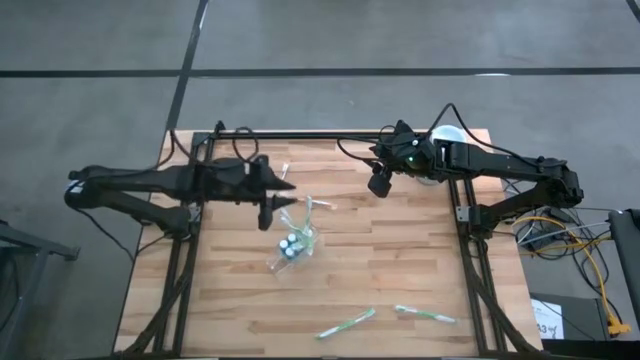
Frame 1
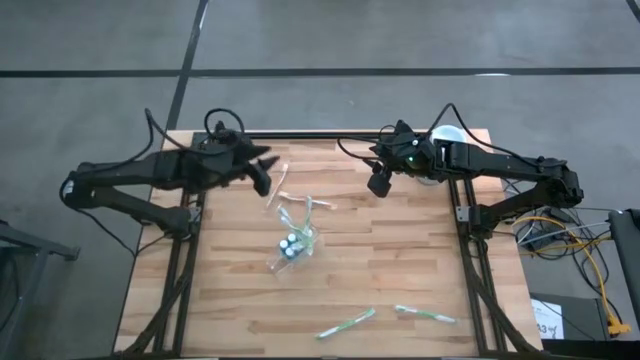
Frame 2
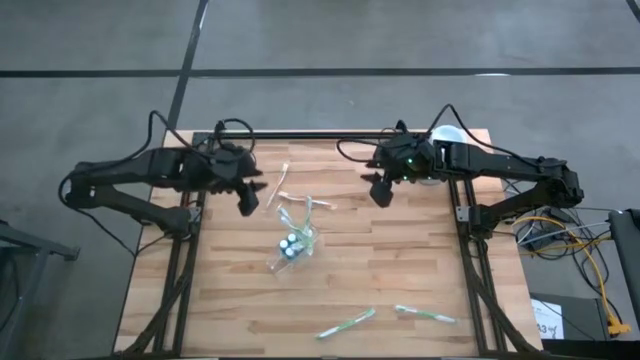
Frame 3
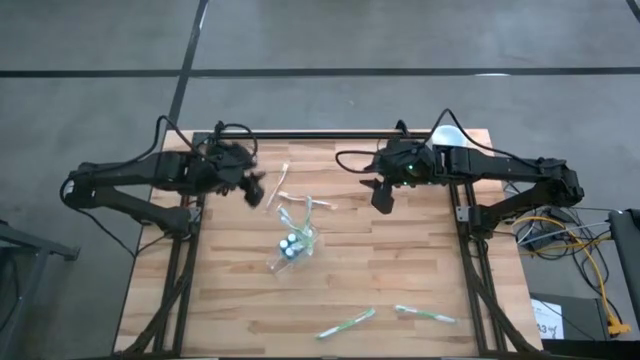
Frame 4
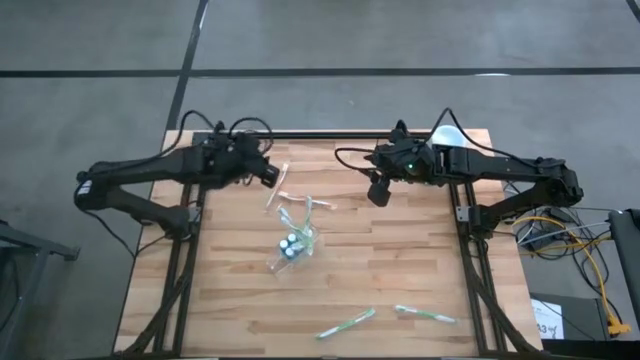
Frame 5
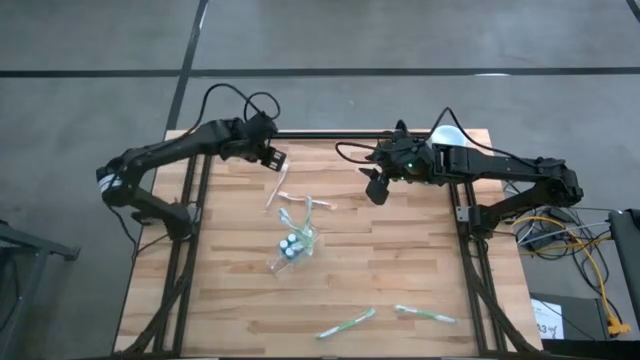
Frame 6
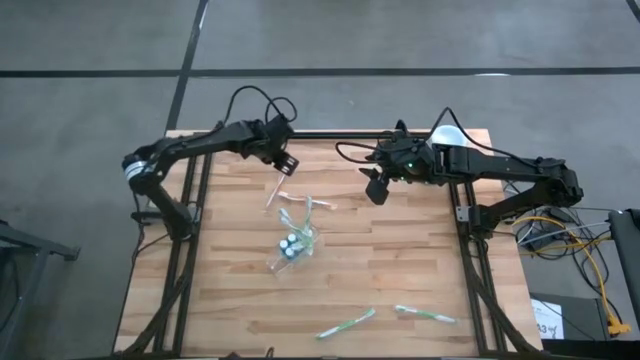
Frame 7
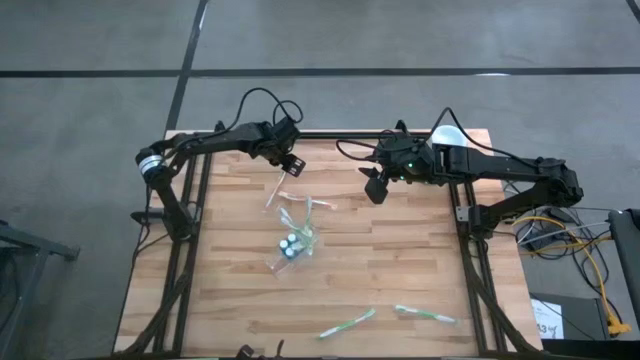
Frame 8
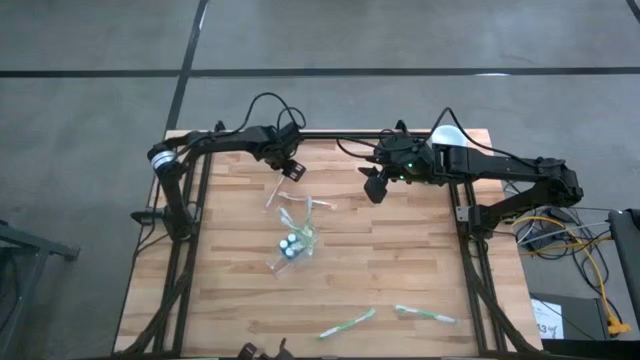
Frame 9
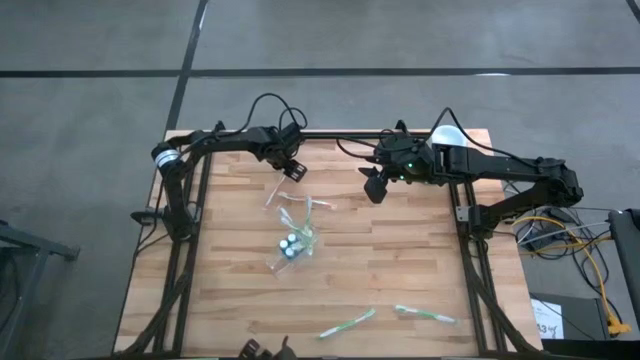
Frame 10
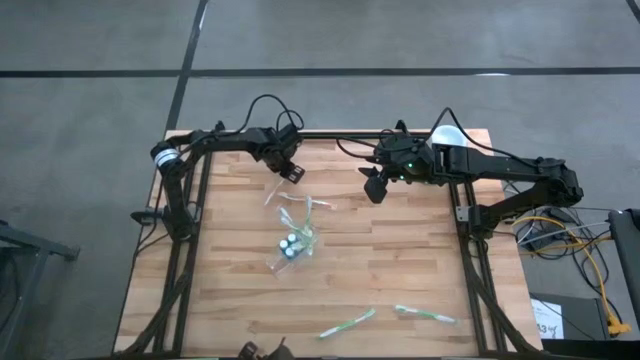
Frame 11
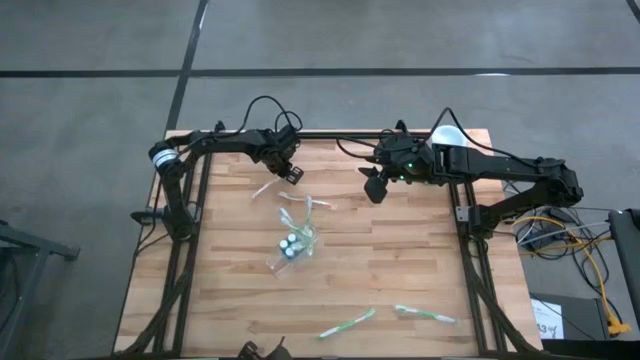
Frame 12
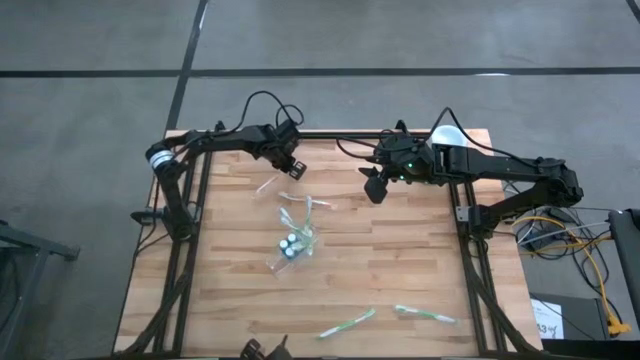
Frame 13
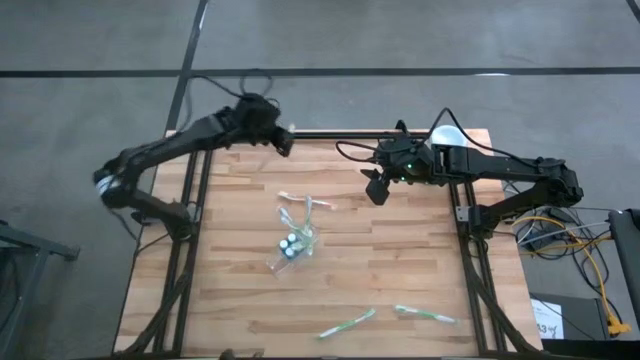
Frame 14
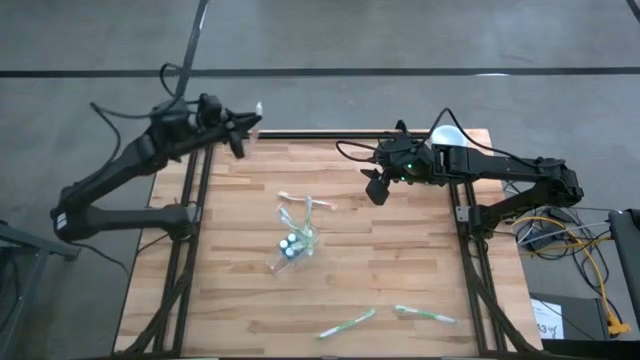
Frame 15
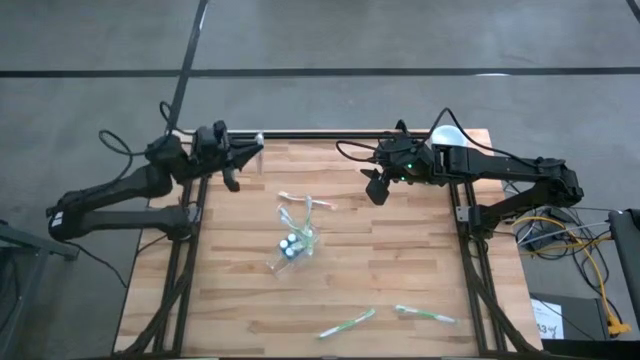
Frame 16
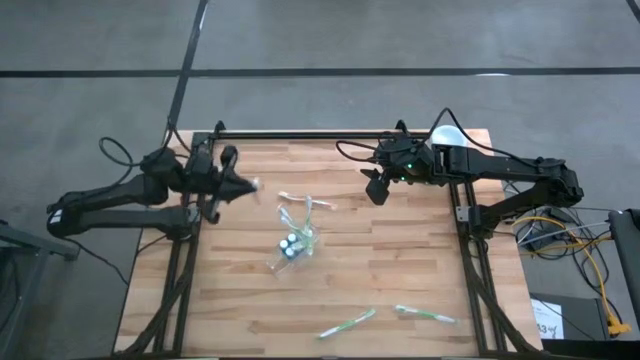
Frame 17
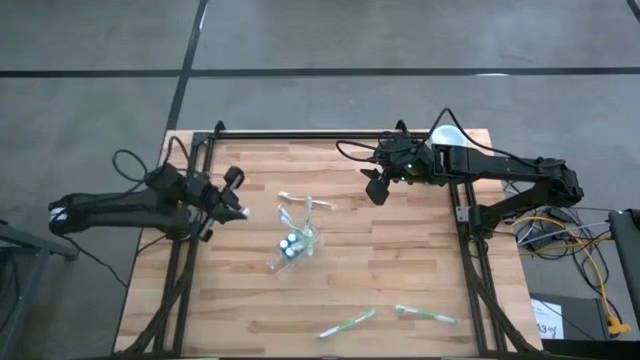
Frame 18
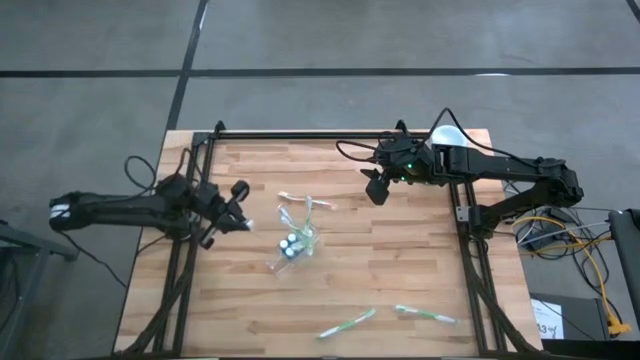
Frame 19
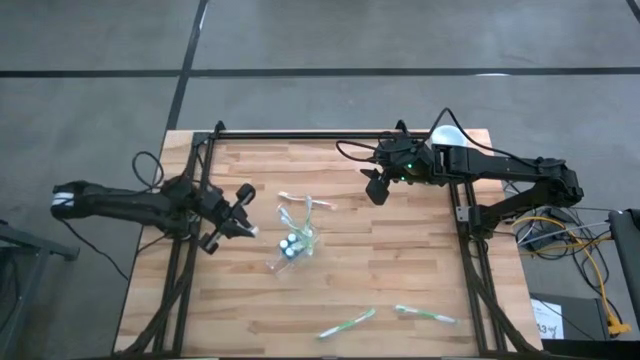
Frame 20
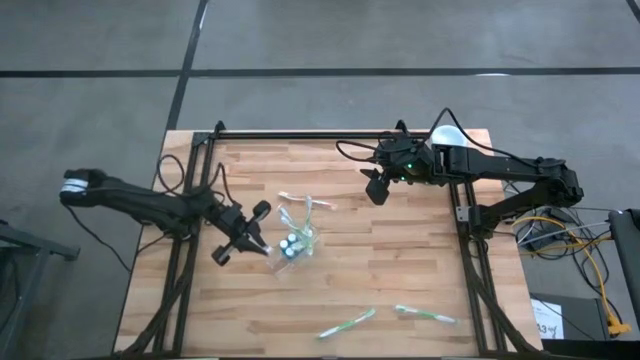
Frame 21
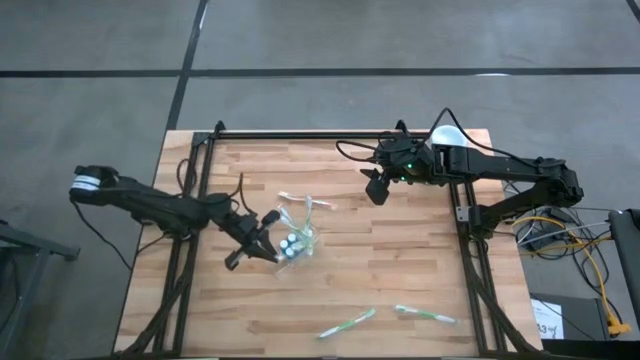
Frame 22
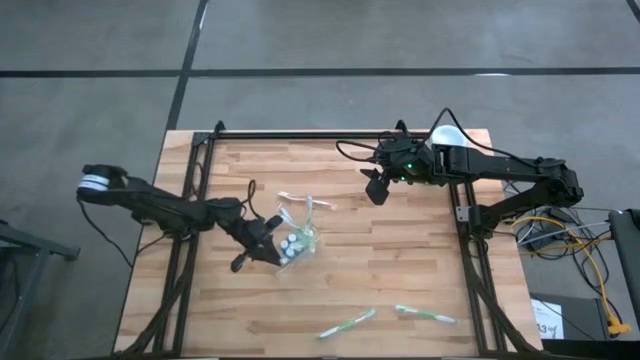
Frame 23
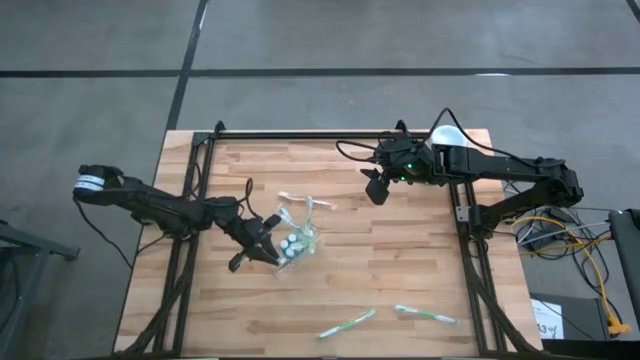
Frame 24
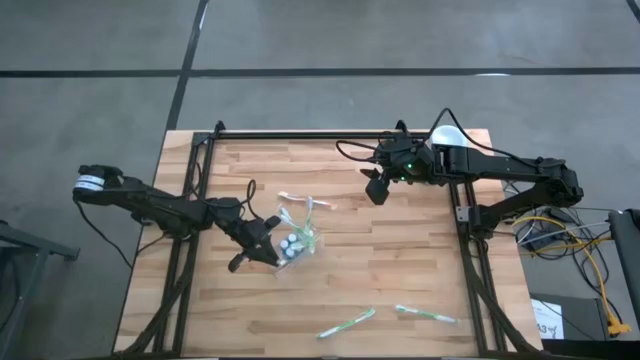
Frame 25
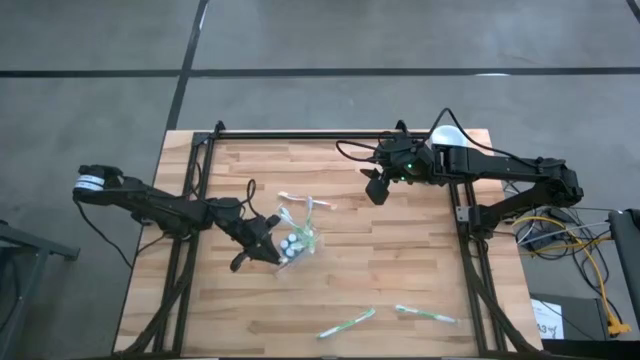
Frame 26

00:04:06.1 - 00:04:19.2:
Task: Pick & Place toothbrushing station
Put the orange toothbrush into the transparent organizer

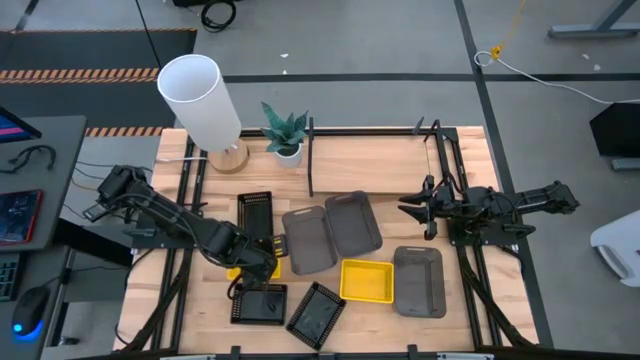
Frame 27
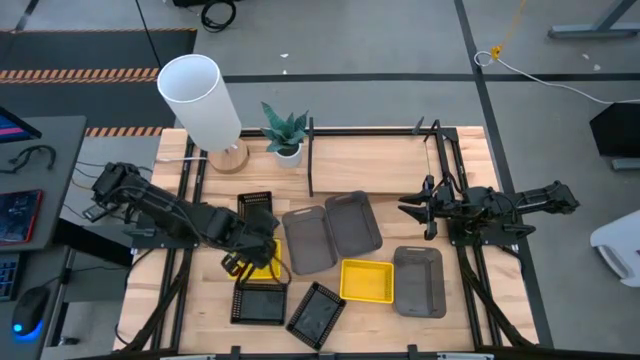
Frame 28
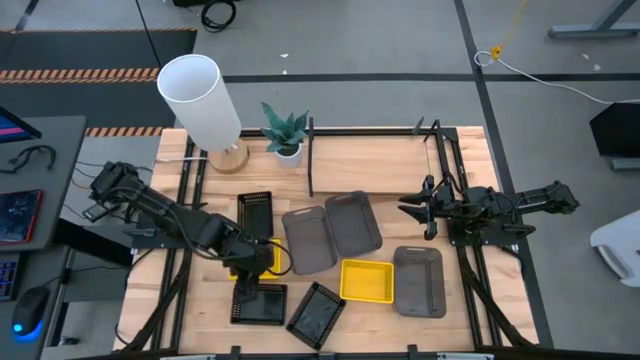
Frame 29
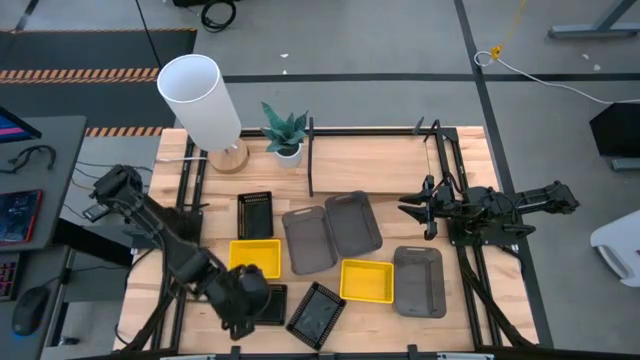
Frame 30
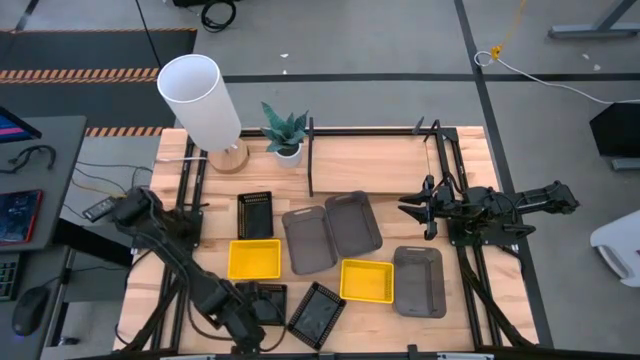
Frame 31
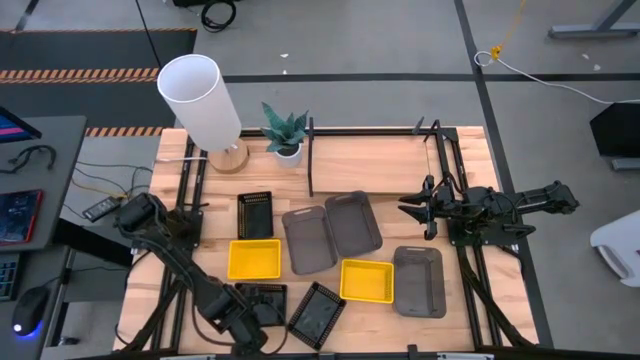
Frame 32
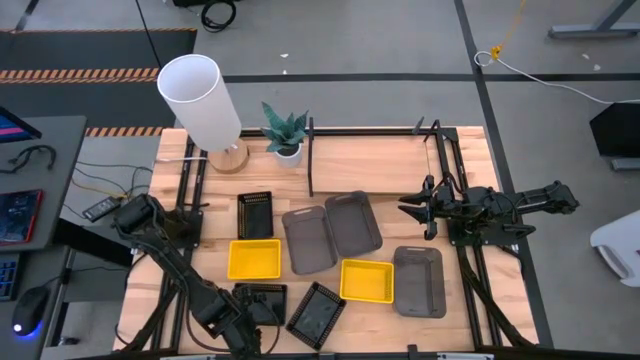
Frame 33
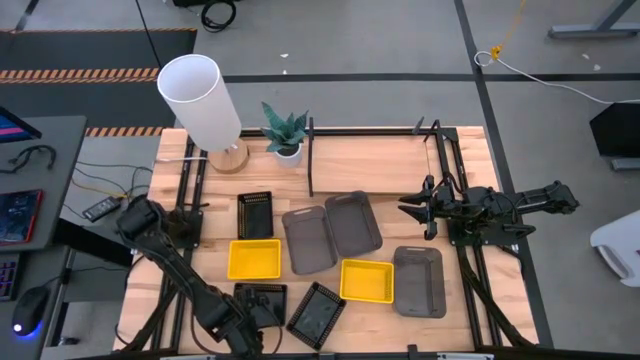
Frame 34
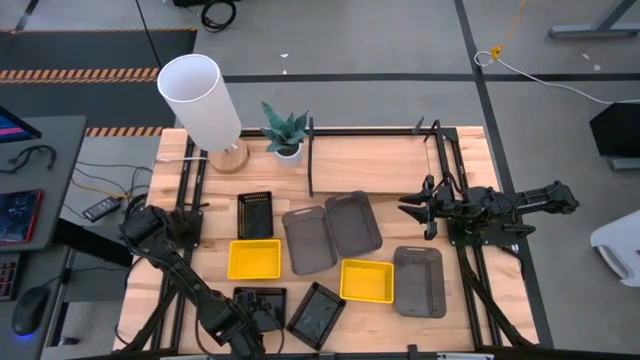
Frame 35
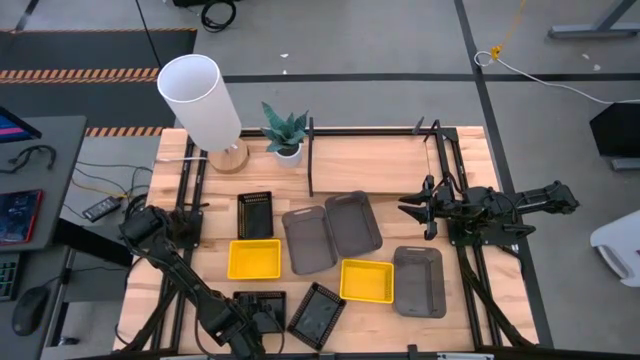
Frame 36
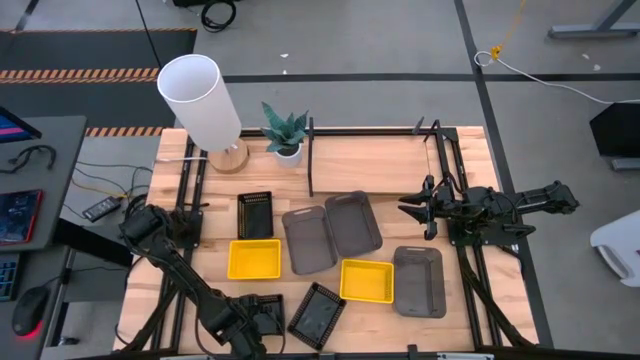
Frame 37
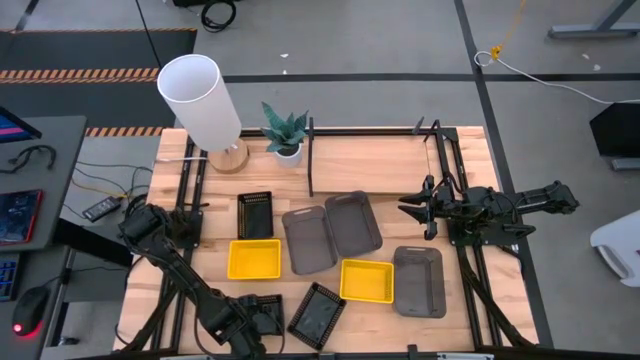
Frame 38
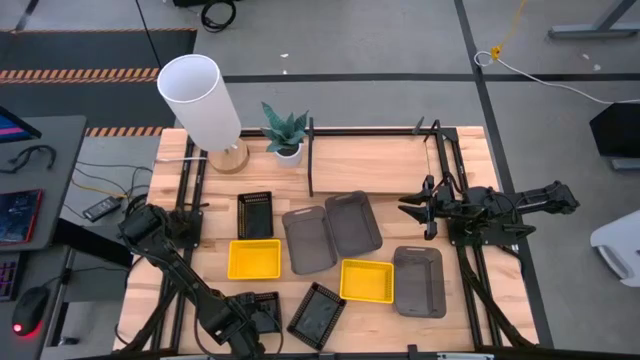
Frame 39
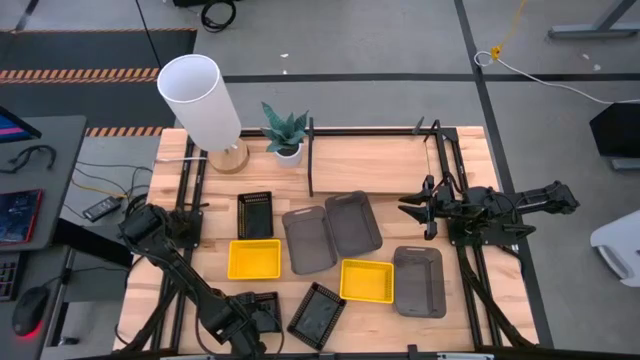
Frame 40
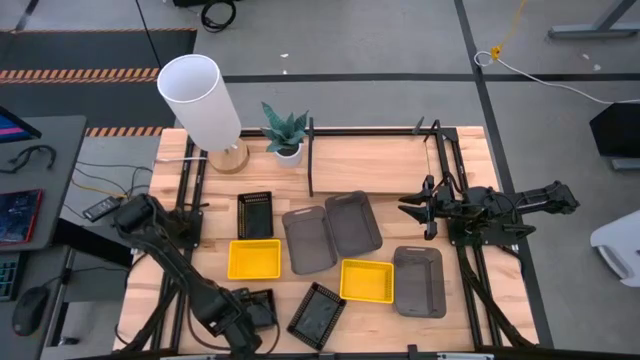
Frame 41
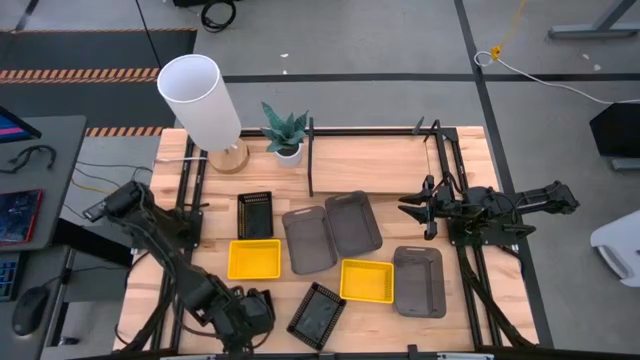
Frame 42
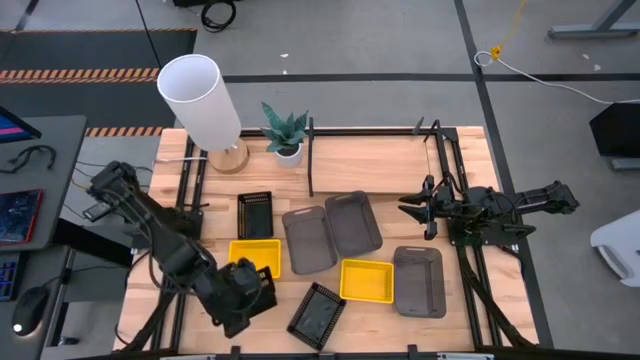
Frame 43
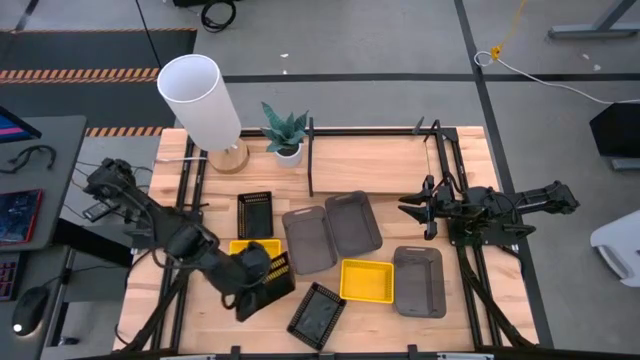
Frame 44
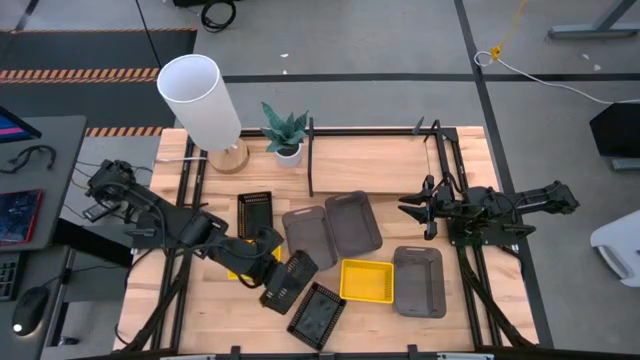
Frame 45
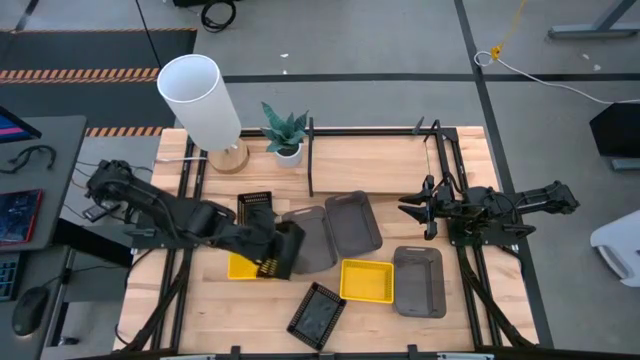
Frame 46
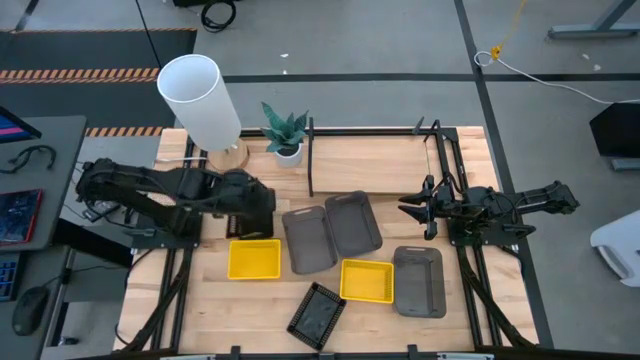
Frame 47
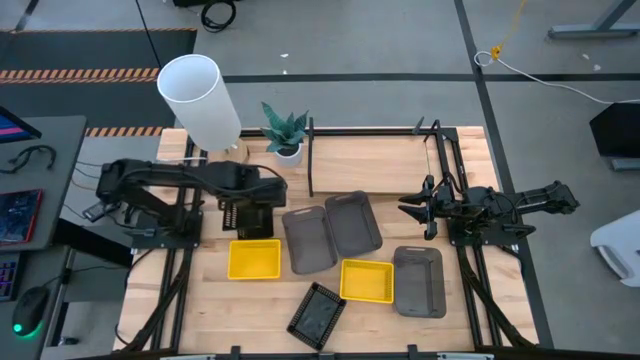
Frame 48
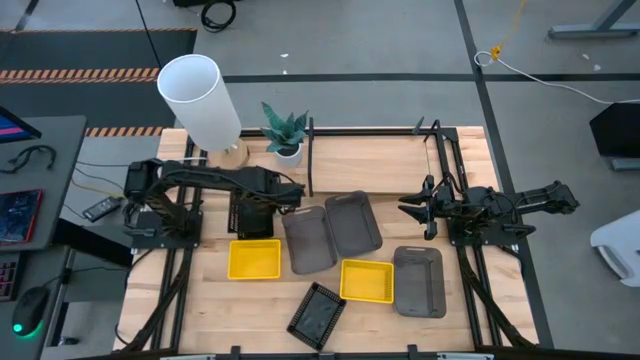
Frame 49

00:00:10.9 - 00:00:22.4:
Task: Stack baskets on shelf by color
Stack the bottom left black bin on the top black bin
